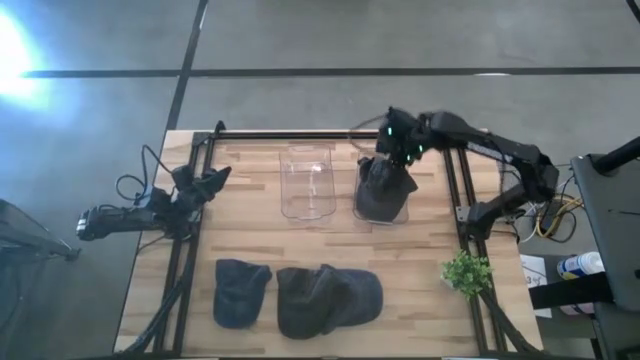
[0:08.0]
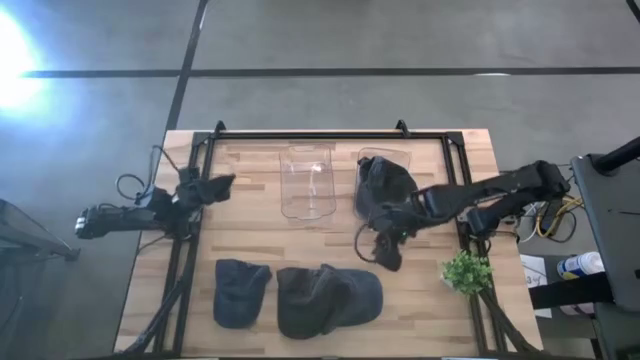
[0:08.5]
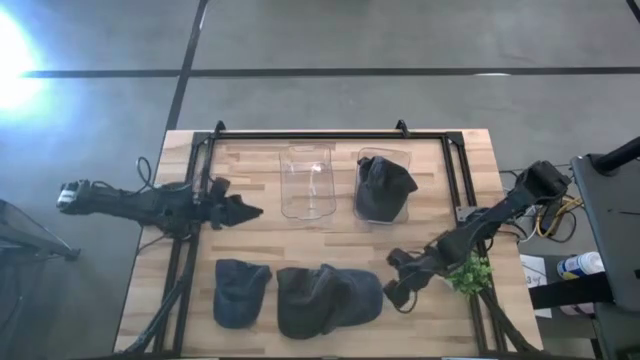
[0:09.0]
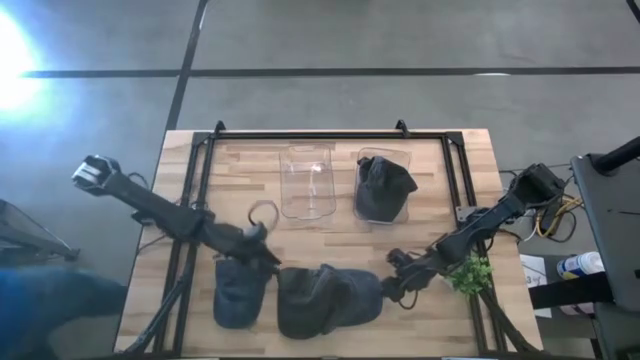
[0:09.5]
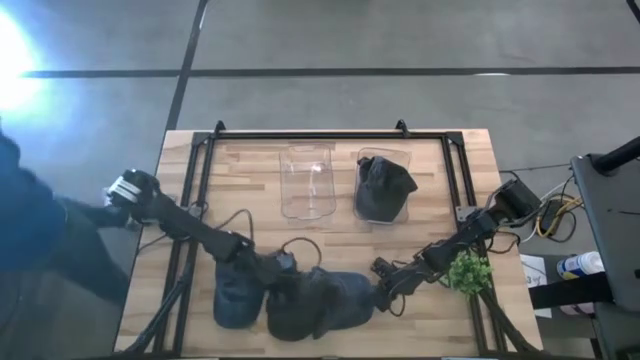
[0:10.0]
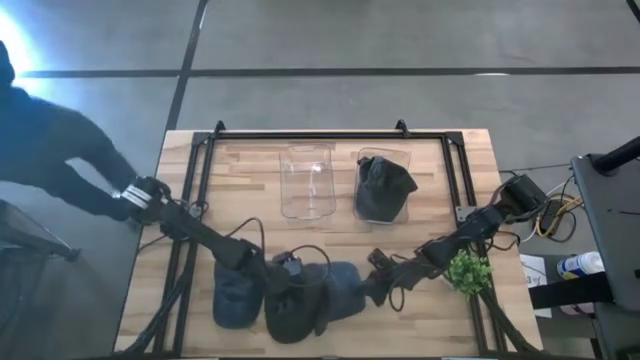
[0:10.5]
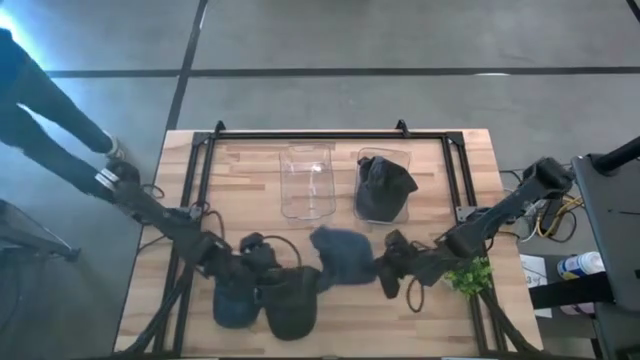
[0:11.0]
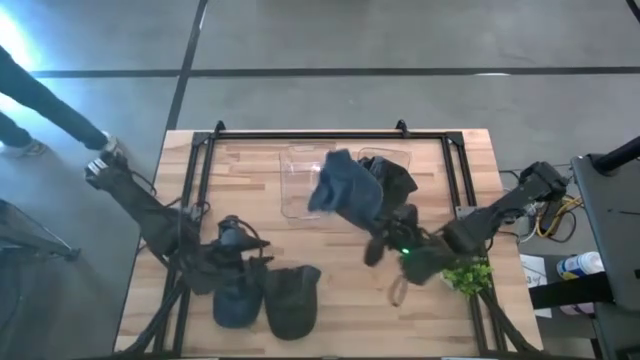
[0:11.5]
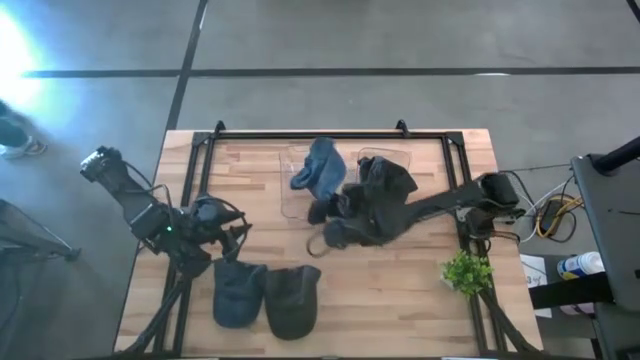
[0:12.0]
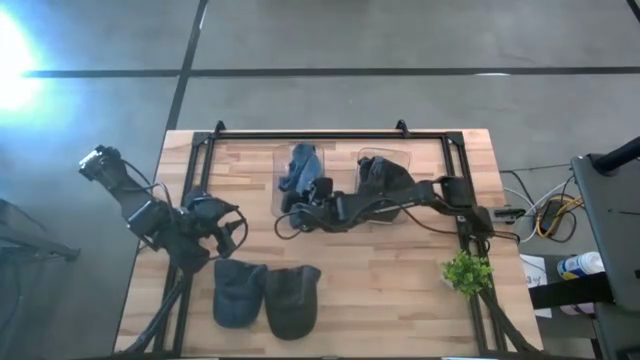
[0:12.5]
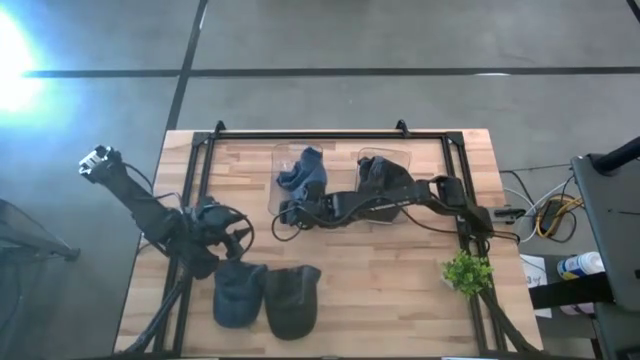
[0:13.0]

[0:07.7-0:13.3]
Task: Pick & Place hat
Put the right blue cap into the left transparent bin

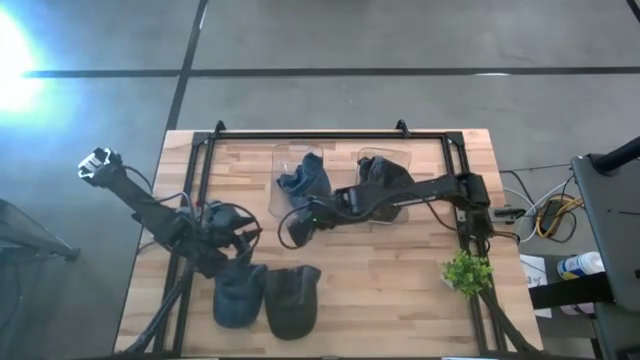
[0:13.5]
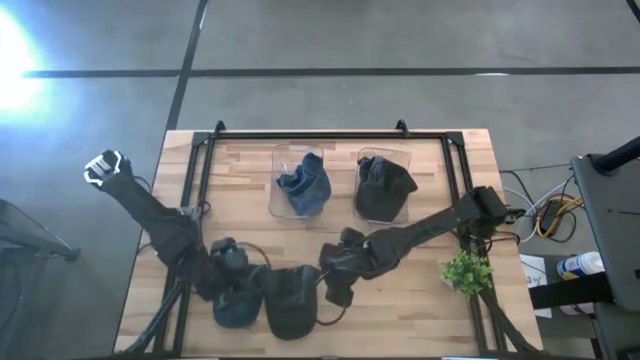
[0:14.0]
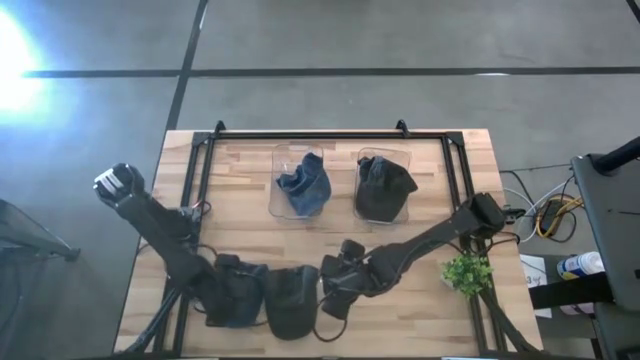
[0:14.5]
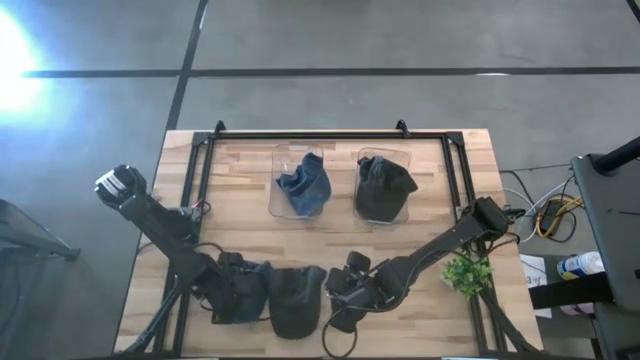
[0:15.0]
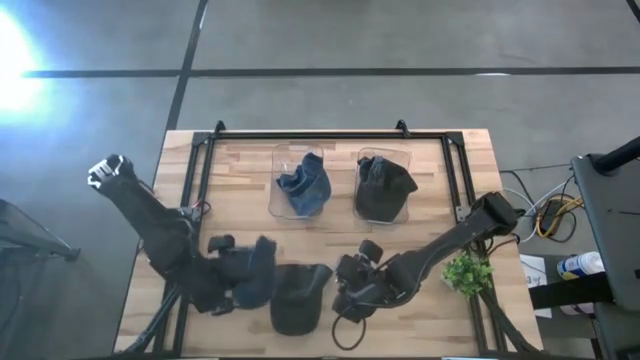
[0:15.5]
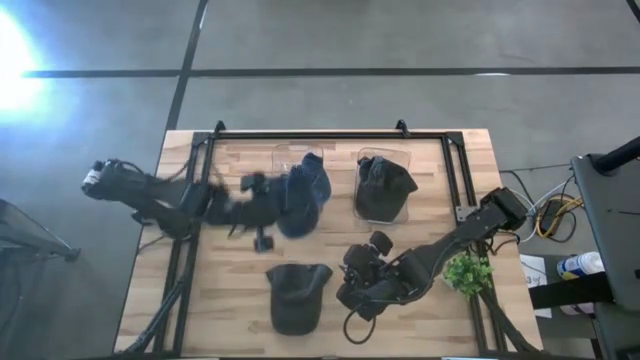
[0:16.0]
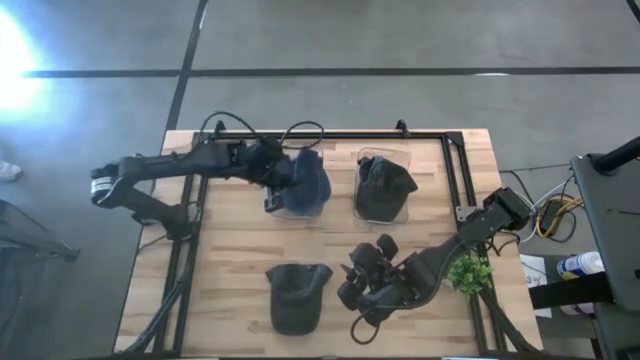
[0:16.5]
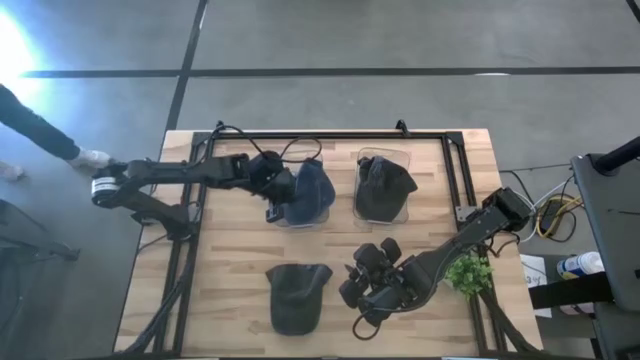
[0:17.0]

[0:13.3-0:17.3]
Put the blue cap into the left transparent bin

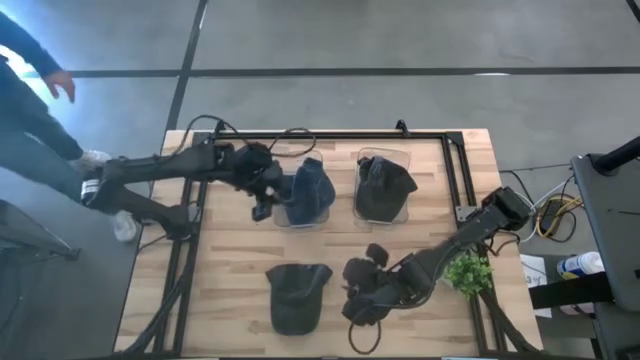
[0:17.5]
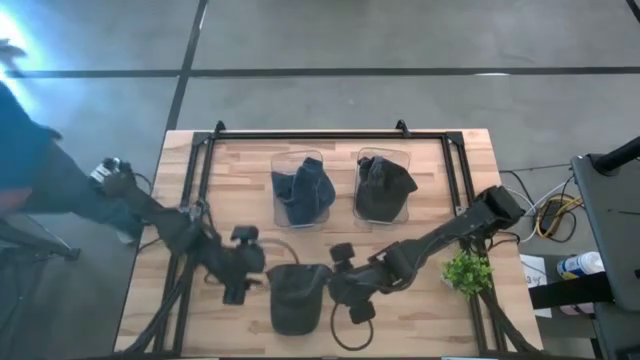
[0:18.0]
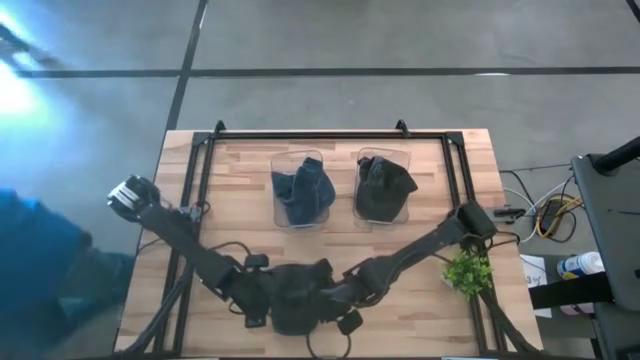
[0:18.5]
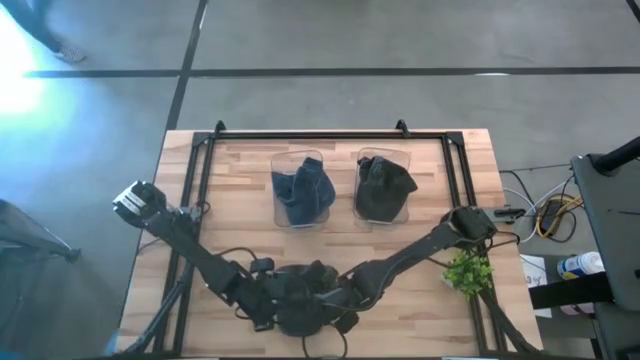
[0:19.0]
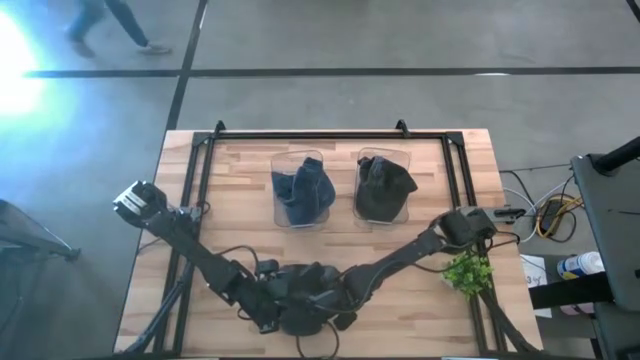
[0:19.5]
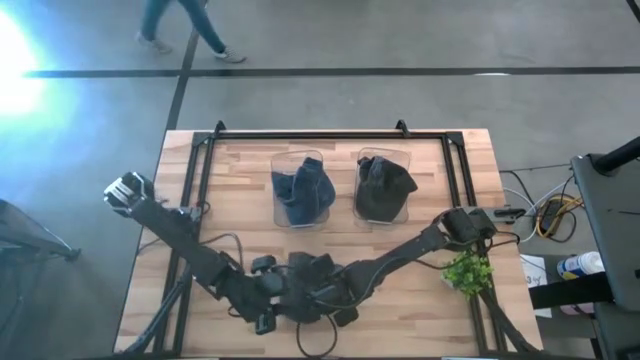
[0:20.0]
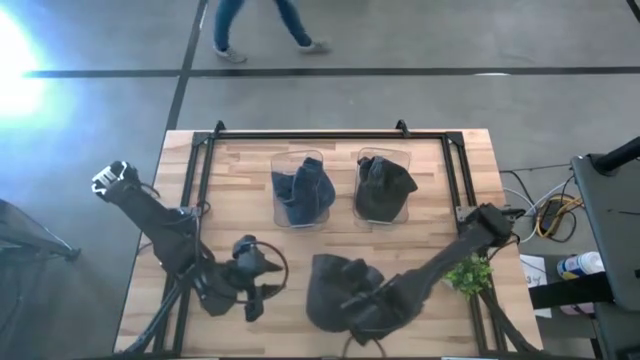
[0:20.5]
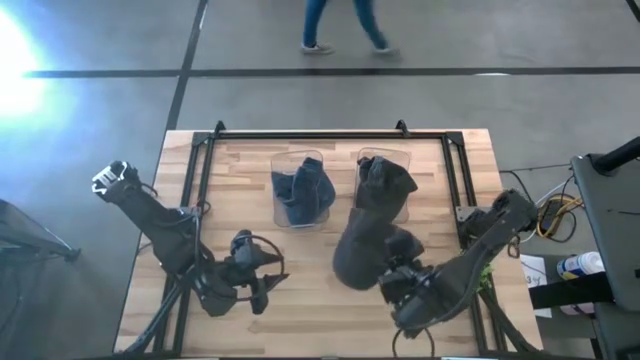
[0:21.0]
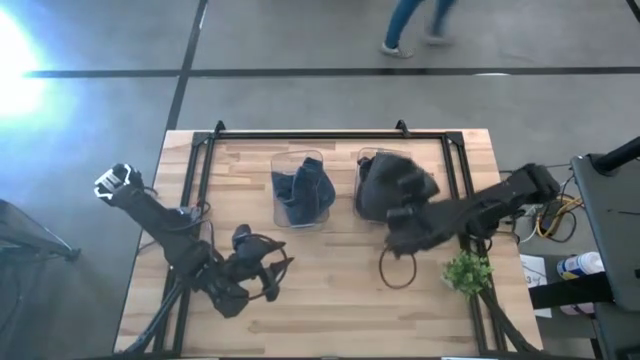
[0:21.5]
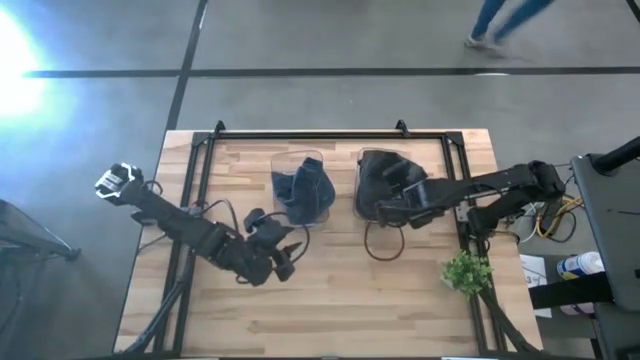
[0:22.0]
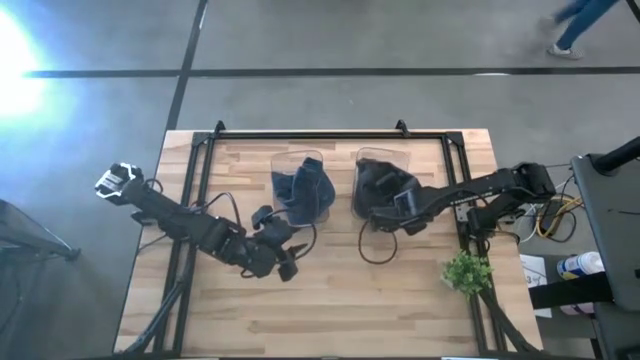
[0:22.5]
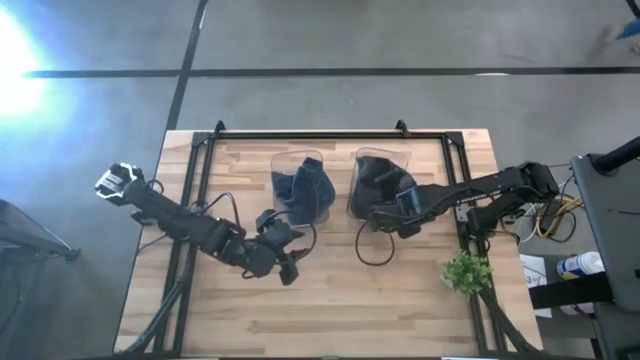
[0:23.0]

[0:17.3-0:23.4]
Put the gray cap into the right transparent bin

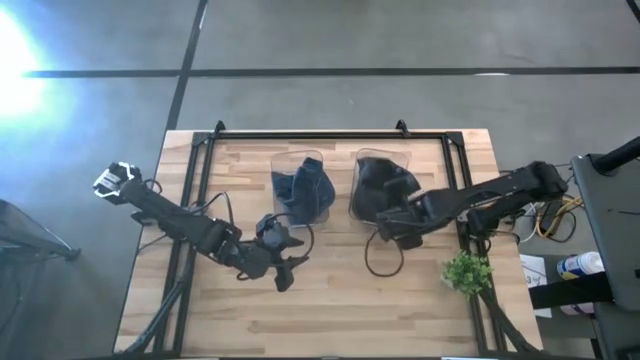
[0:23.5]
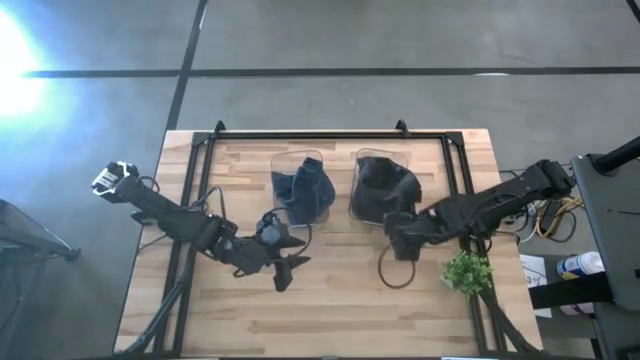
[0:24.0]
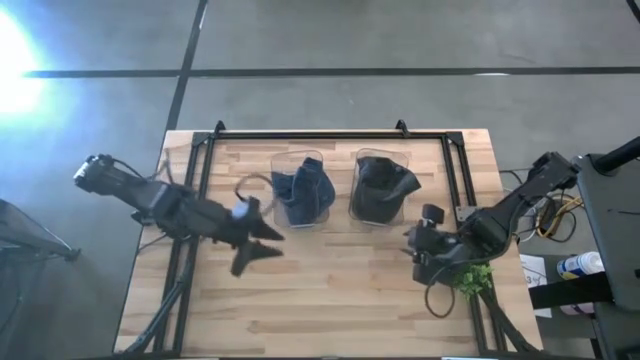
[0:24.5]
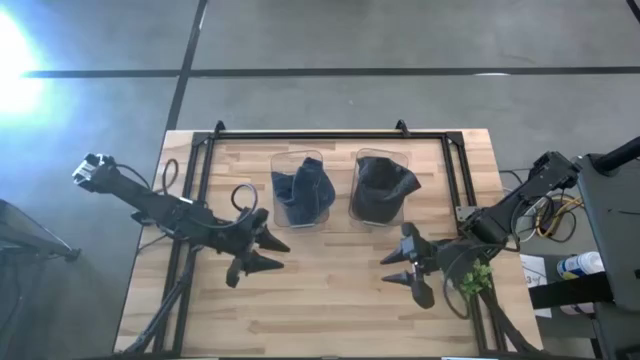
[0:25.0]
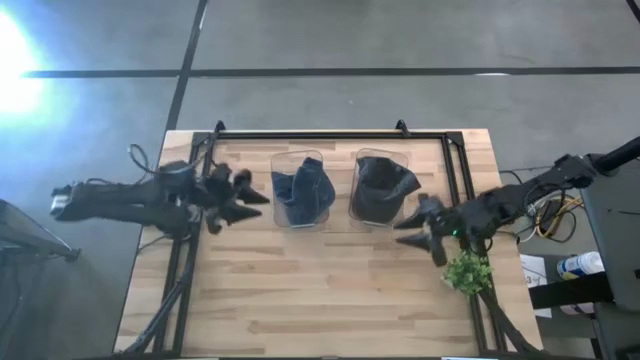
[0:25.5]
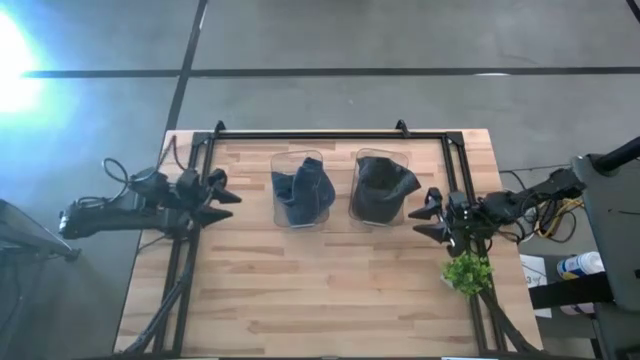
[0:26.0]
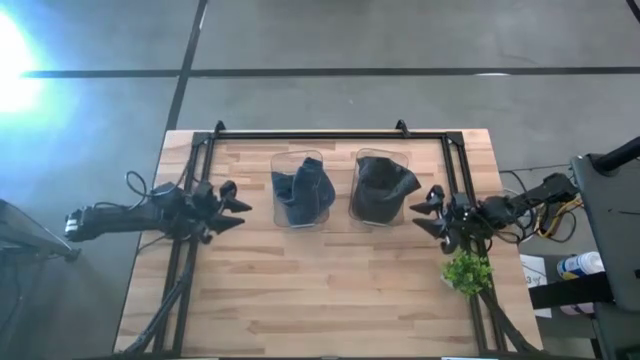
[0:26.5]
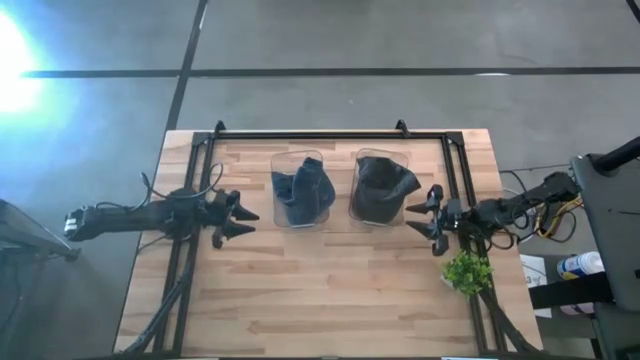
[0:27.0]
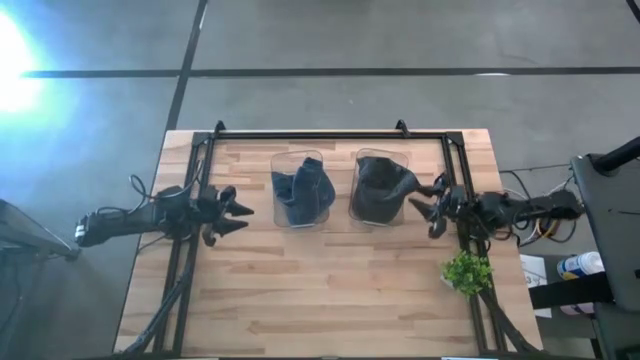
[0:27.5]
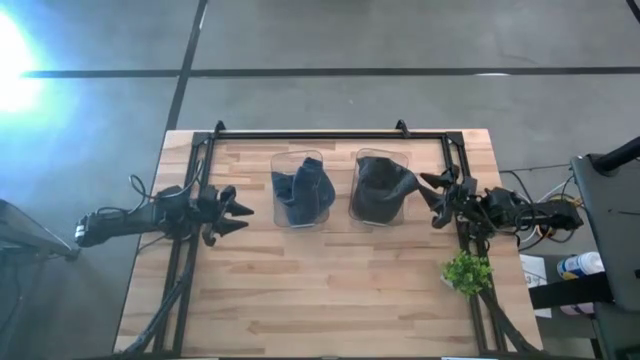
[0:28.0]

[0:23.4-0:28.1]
Return to Home Position
